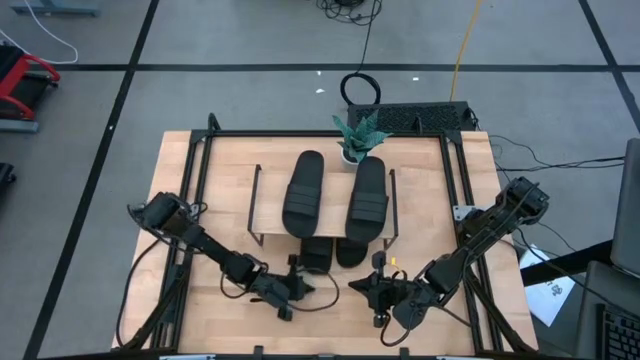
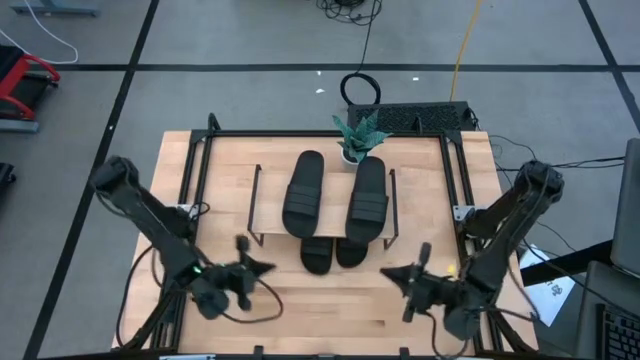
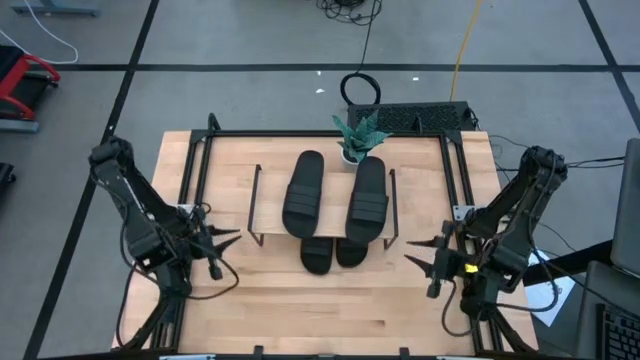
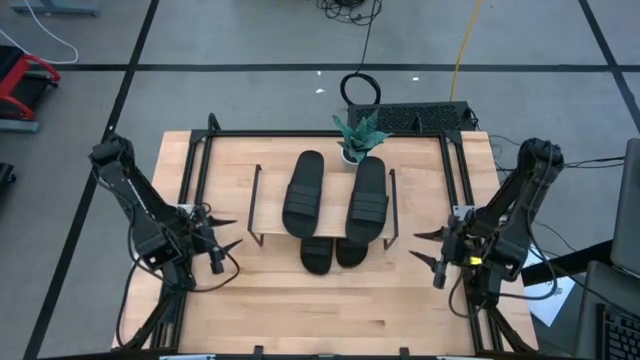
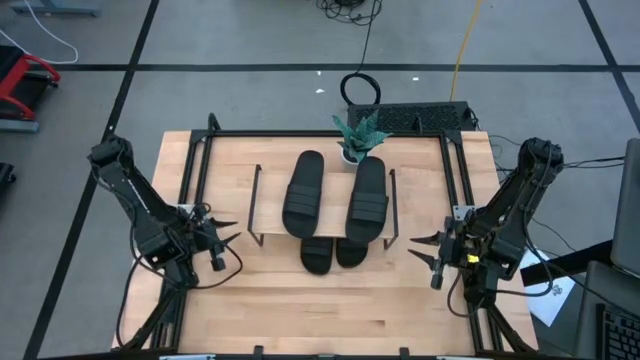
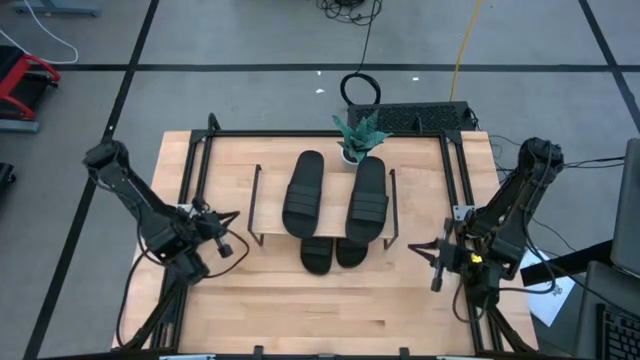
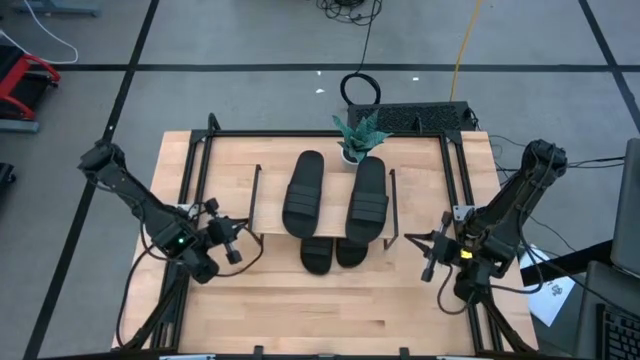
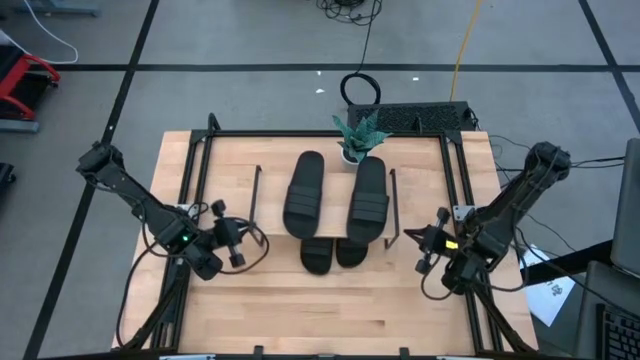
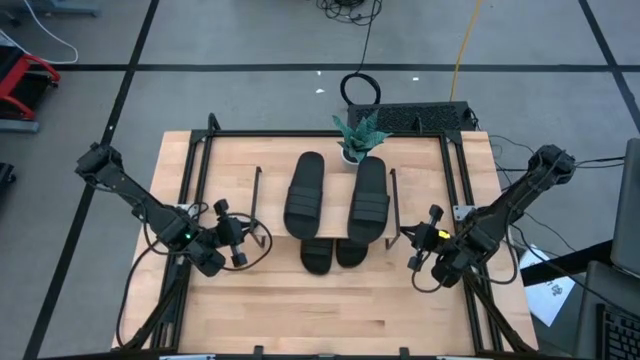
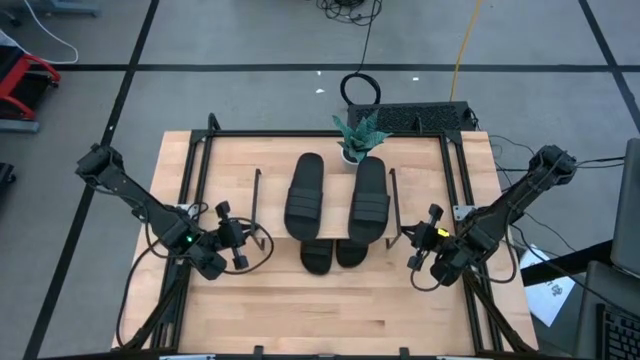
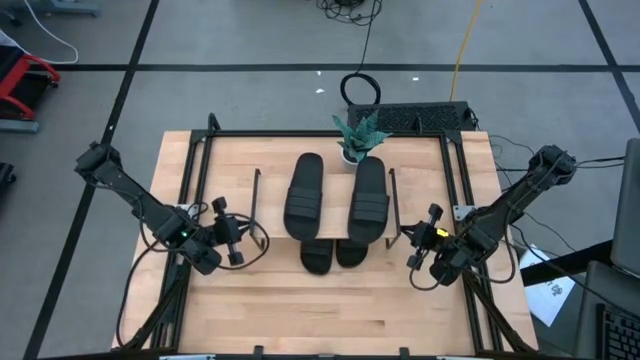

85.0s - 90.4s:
Task: Pick and place slides into the shelf
Adjust the shelf

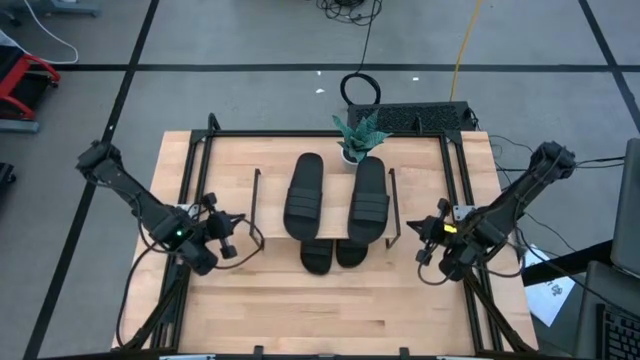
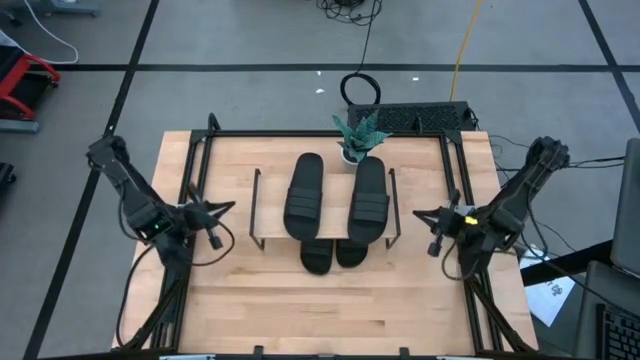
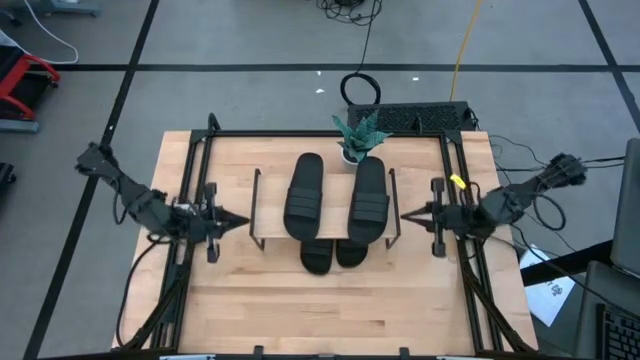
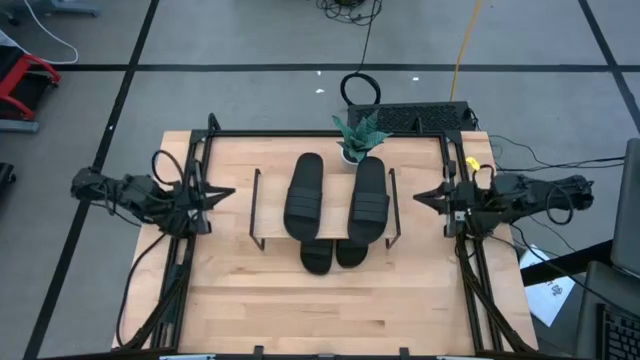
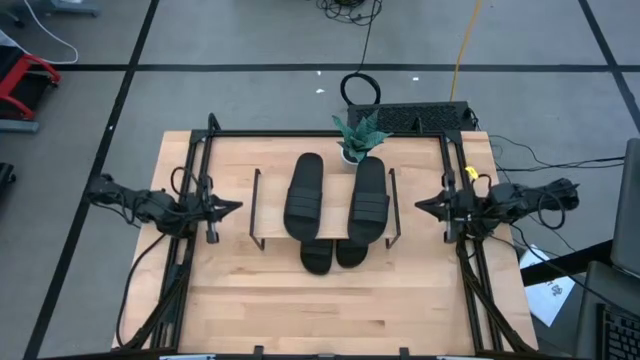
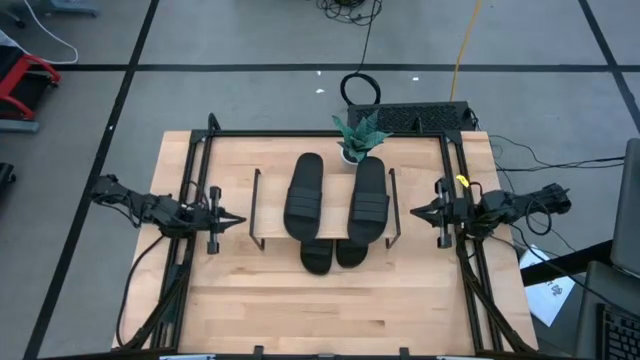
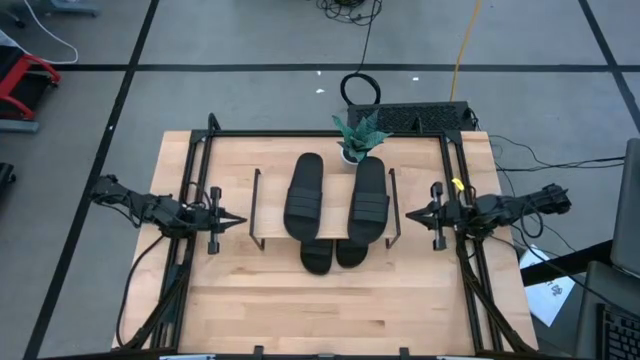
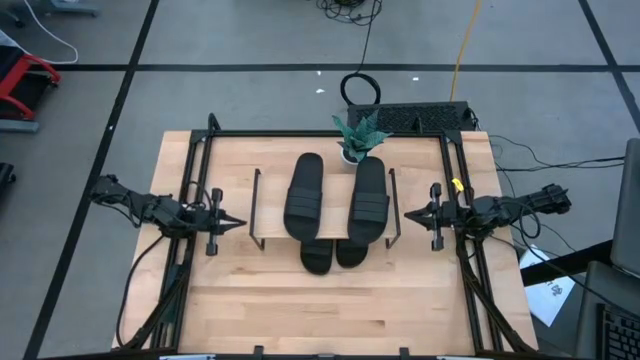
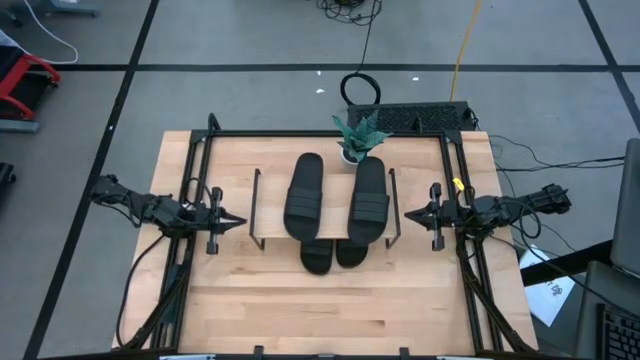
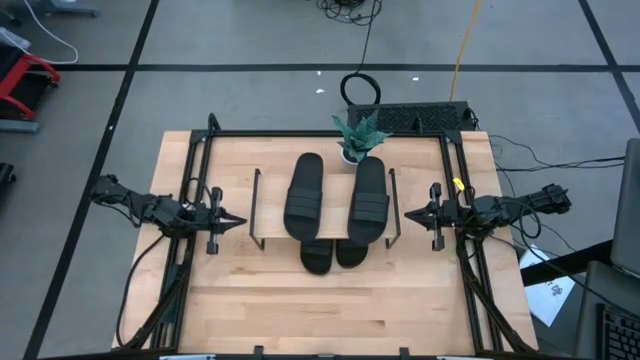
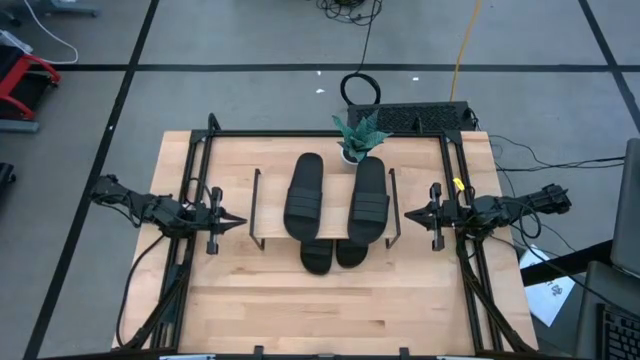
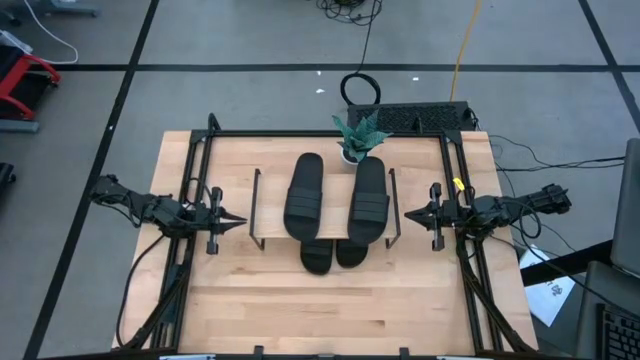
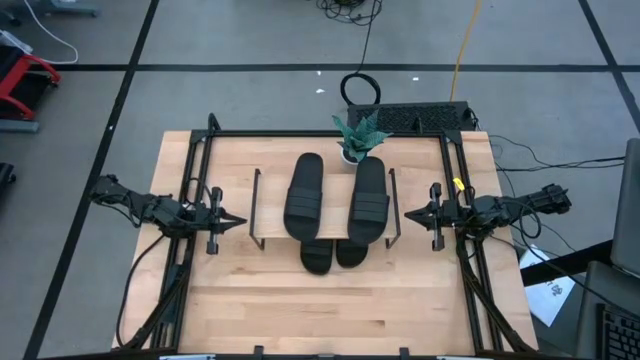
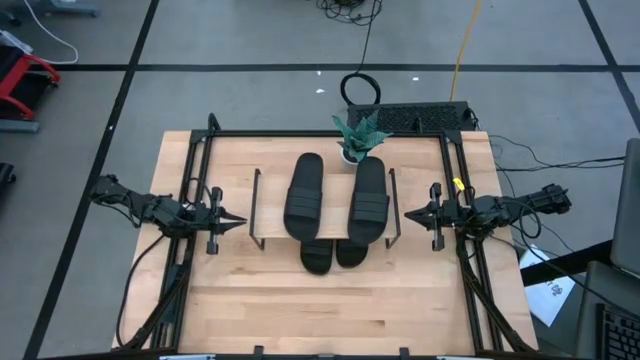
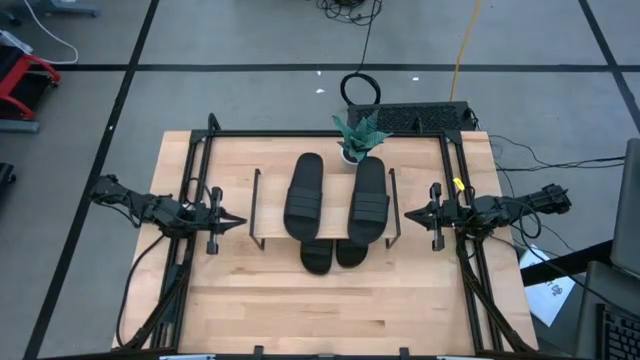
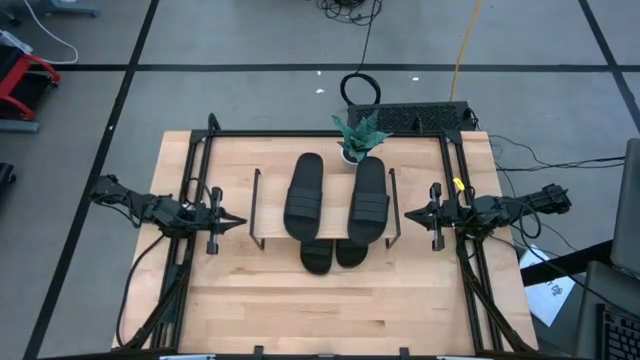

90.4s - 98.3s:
Return to Home Position

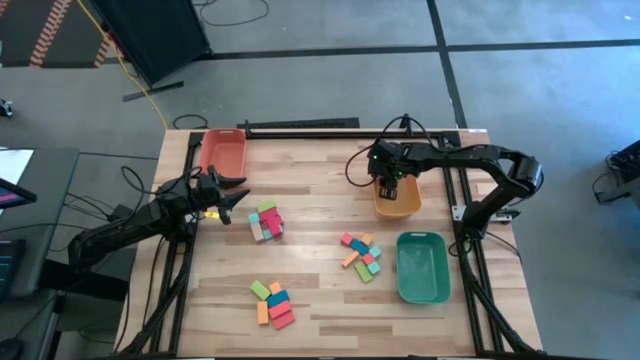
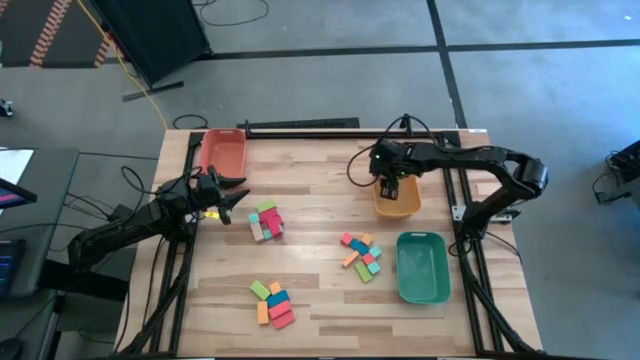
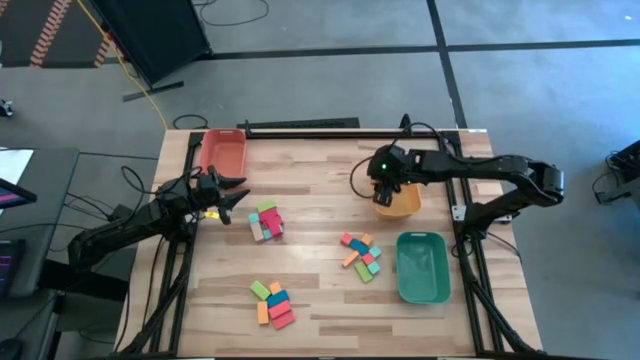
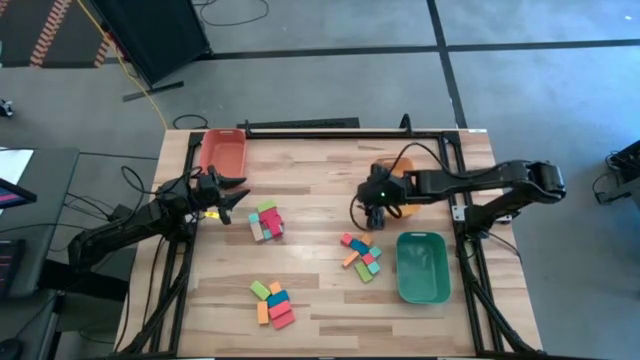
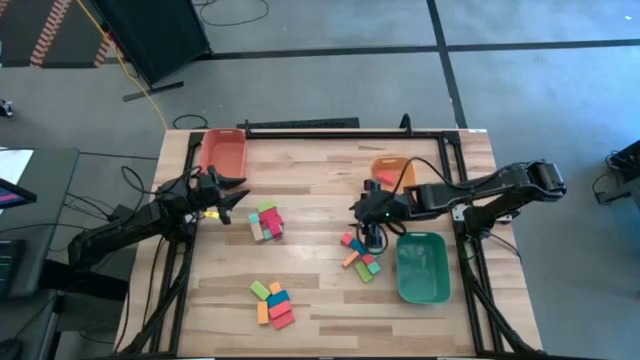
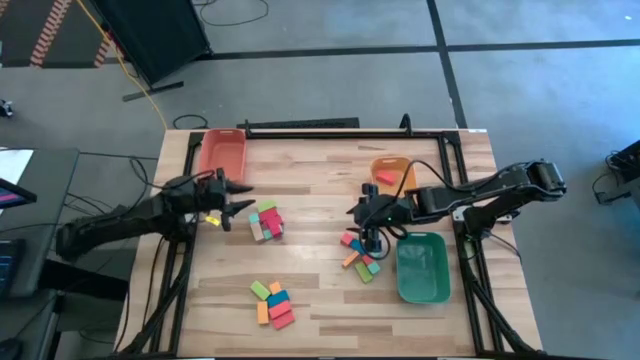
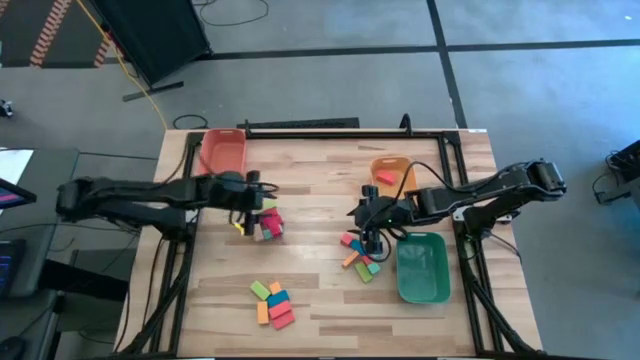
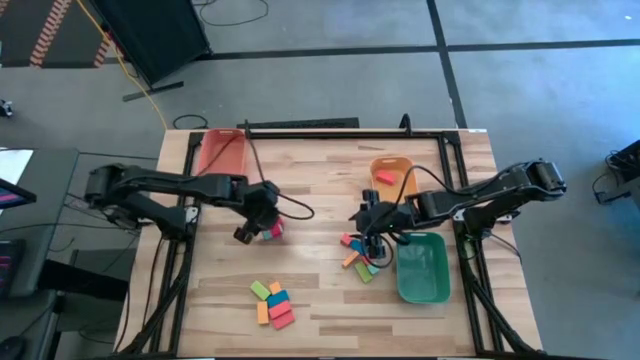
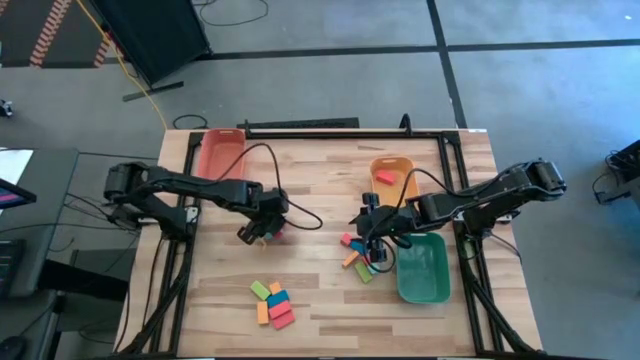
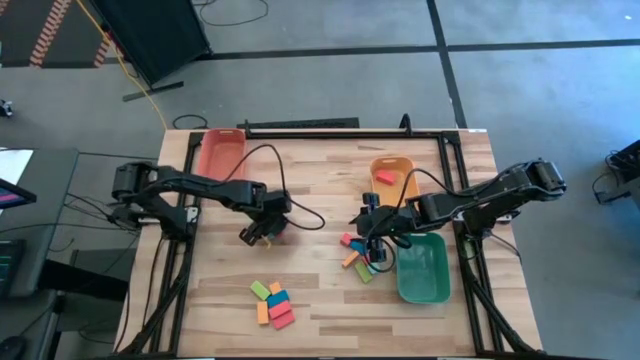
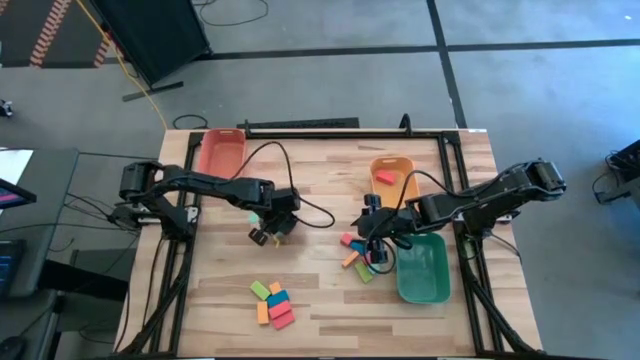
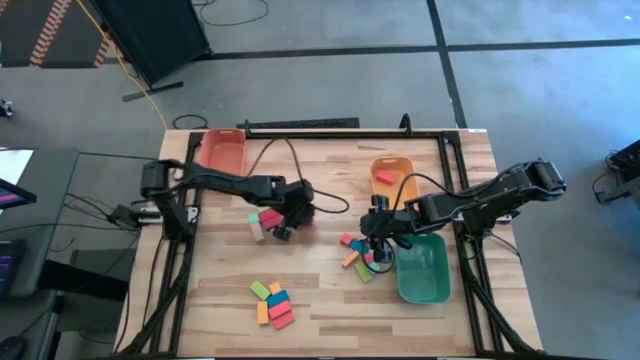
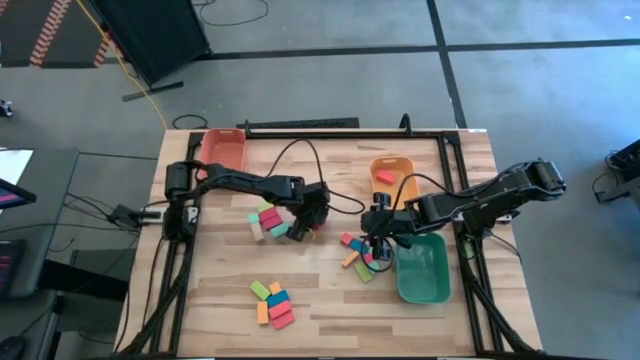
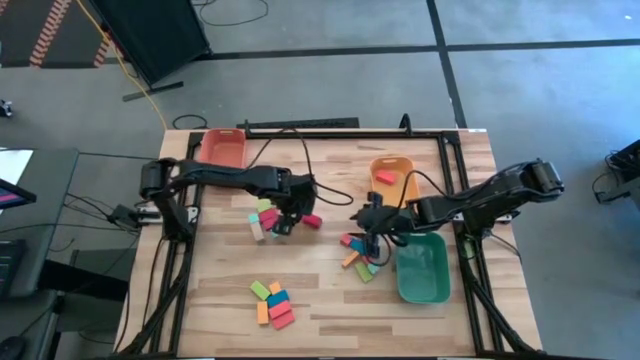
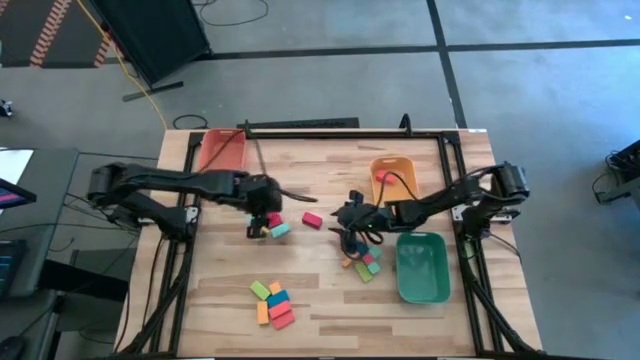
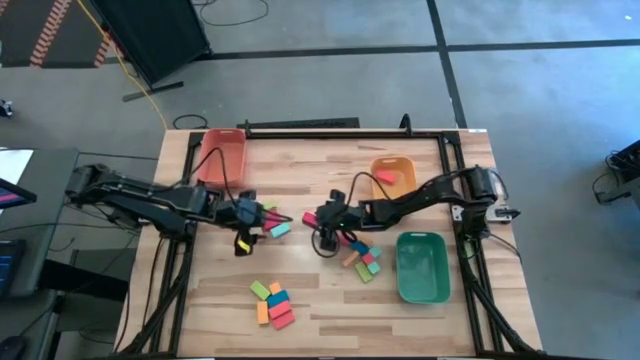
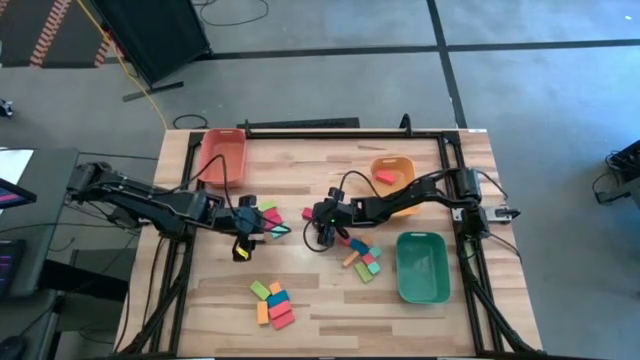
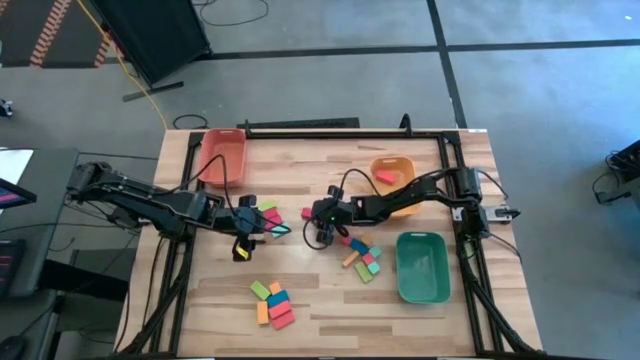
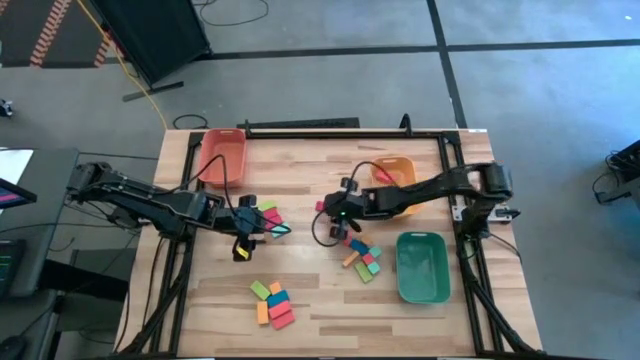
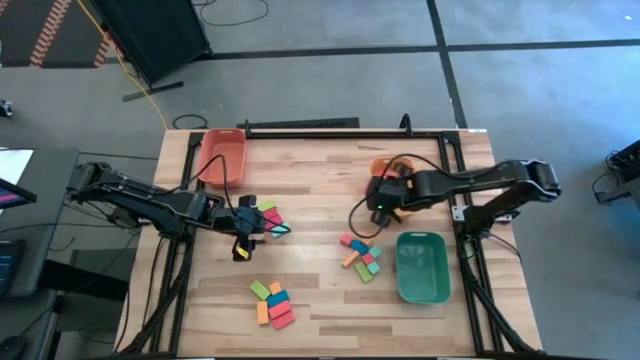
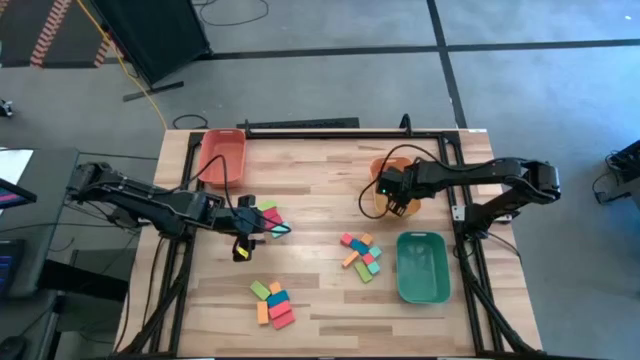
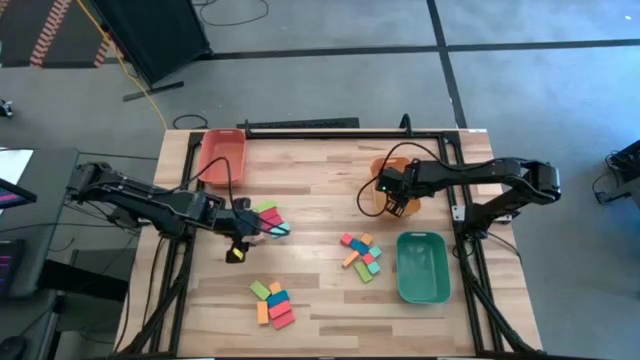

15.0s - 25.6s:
Task: Sort blocks by size
Put the large rectangular red block into the yellow bin
